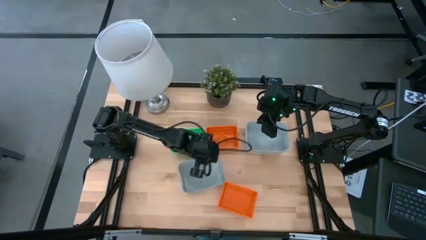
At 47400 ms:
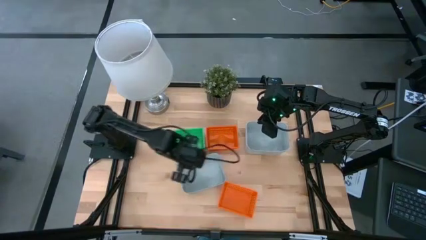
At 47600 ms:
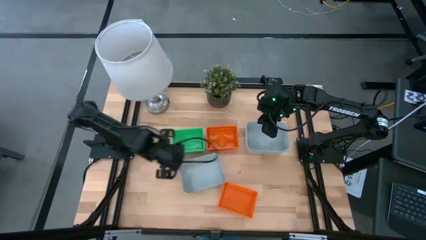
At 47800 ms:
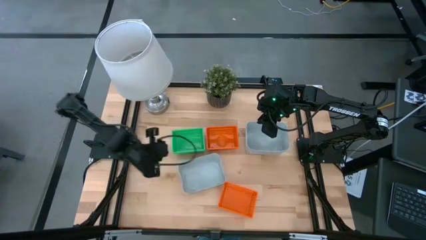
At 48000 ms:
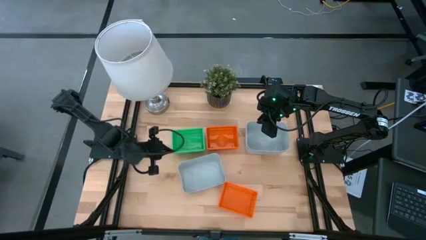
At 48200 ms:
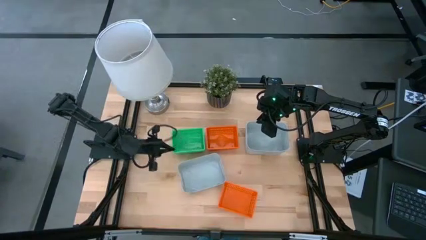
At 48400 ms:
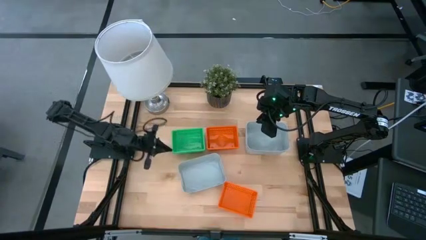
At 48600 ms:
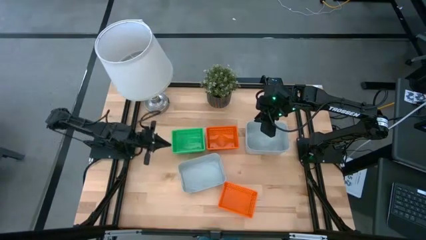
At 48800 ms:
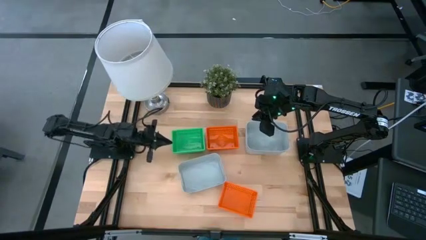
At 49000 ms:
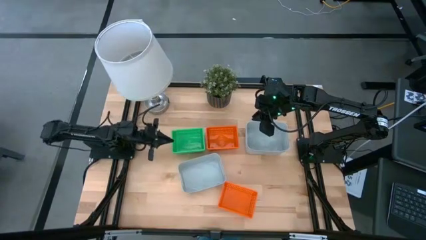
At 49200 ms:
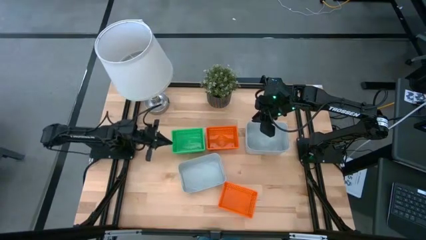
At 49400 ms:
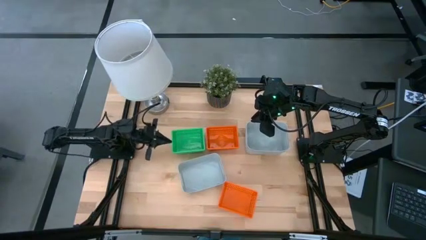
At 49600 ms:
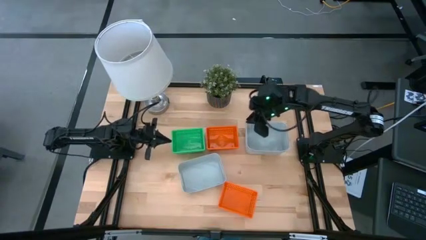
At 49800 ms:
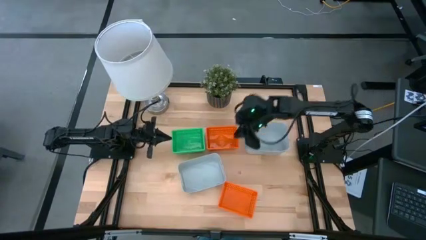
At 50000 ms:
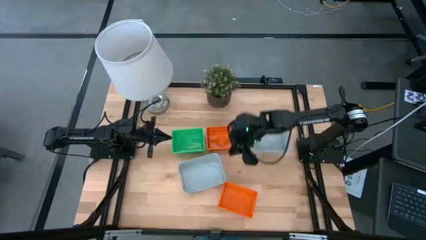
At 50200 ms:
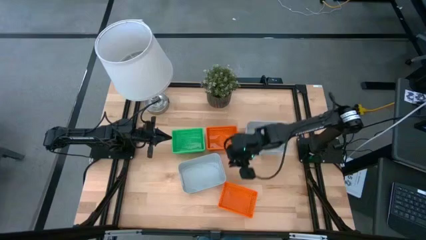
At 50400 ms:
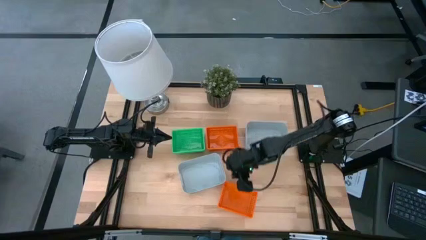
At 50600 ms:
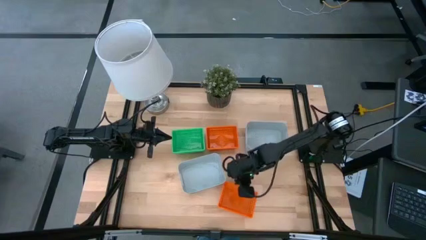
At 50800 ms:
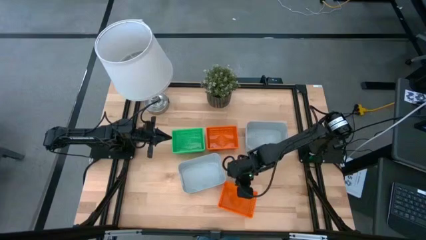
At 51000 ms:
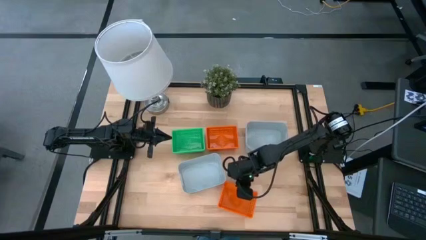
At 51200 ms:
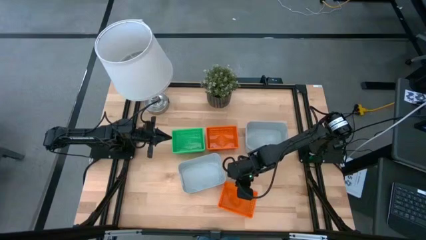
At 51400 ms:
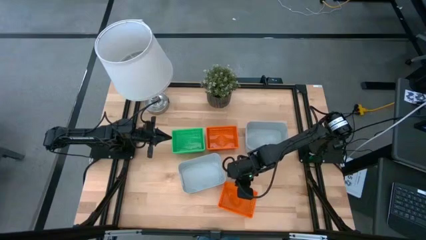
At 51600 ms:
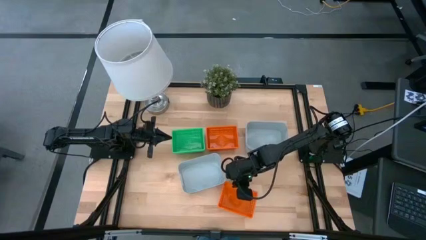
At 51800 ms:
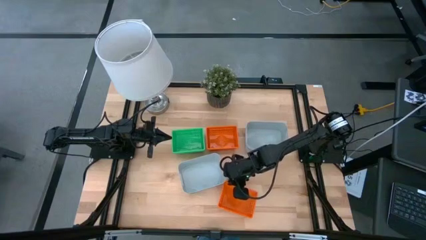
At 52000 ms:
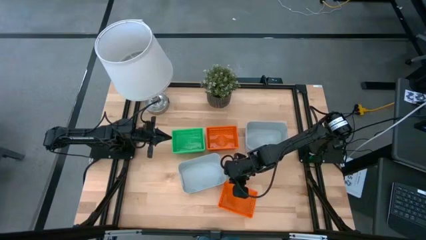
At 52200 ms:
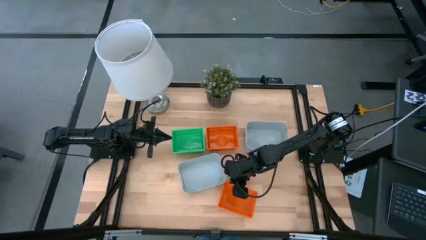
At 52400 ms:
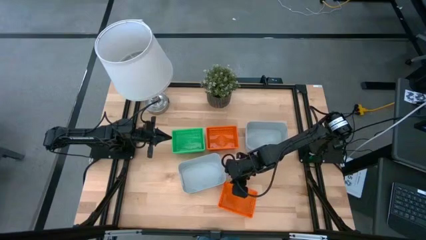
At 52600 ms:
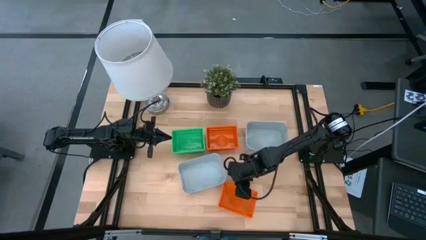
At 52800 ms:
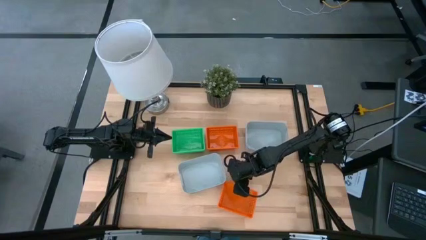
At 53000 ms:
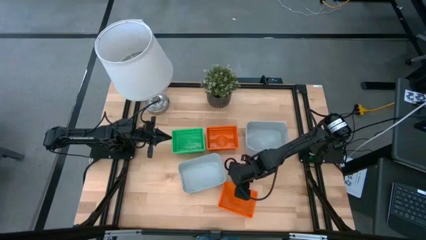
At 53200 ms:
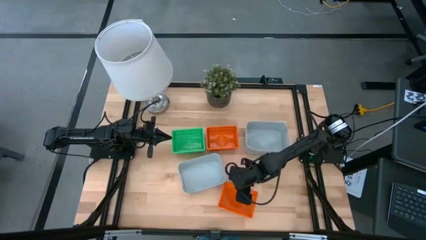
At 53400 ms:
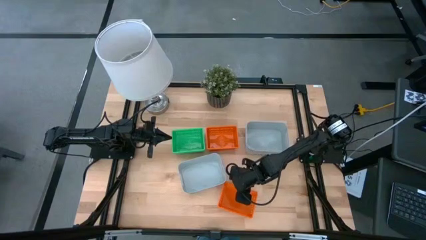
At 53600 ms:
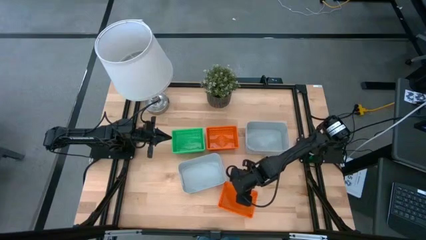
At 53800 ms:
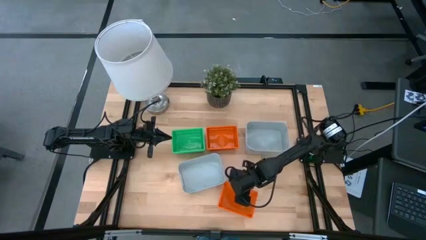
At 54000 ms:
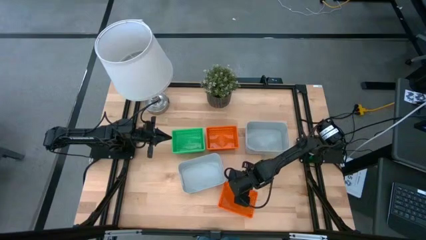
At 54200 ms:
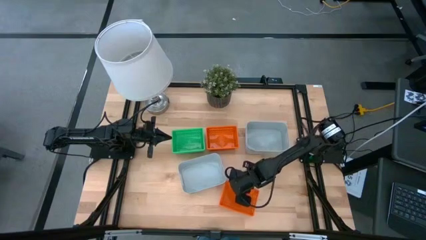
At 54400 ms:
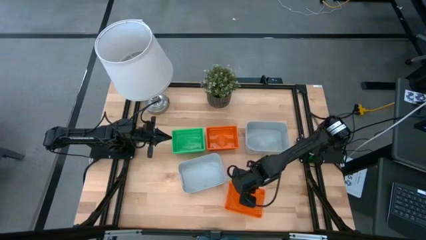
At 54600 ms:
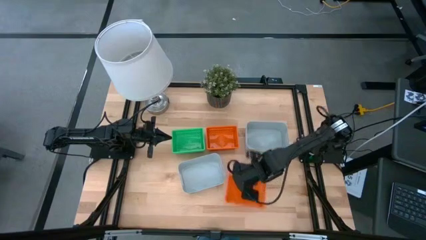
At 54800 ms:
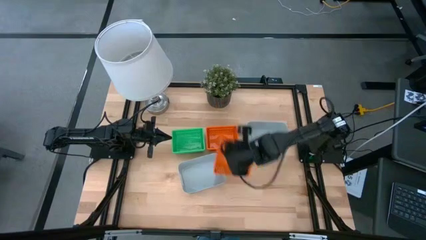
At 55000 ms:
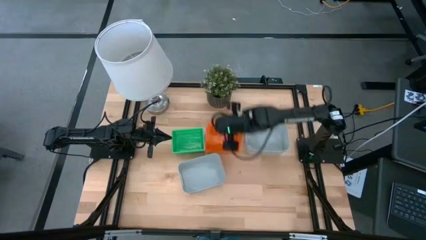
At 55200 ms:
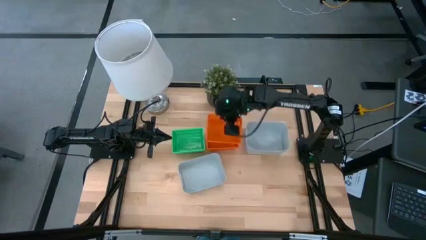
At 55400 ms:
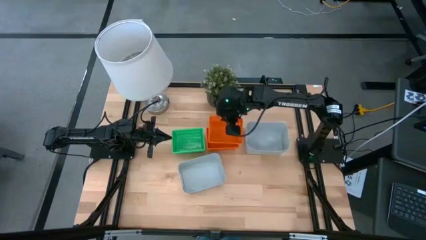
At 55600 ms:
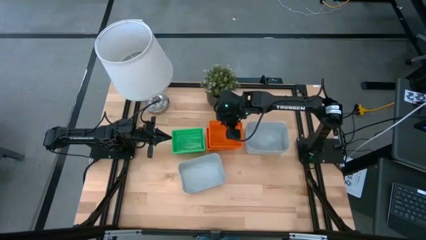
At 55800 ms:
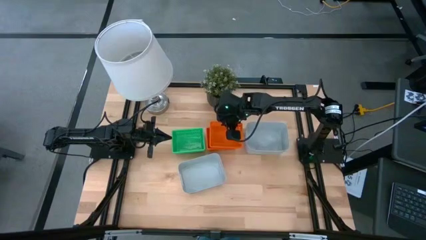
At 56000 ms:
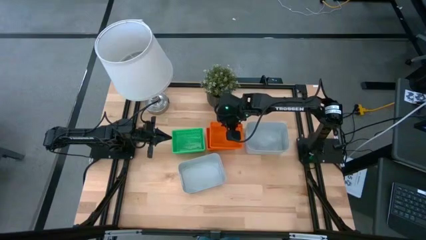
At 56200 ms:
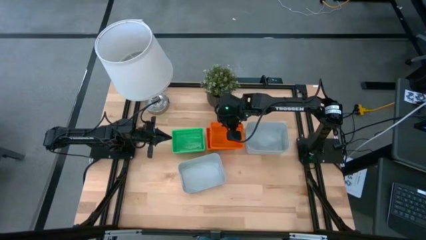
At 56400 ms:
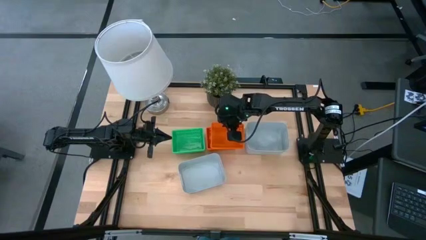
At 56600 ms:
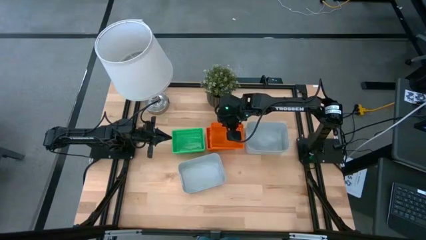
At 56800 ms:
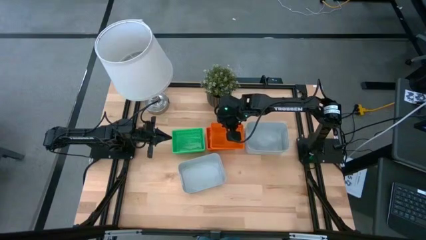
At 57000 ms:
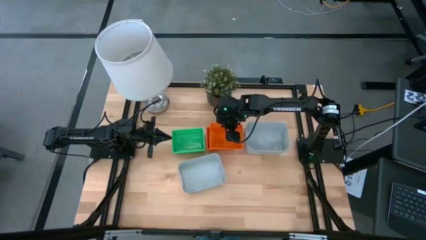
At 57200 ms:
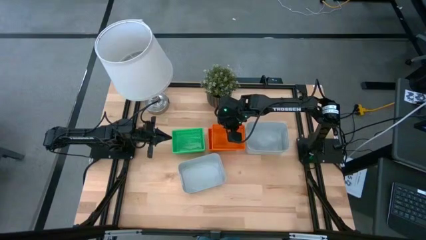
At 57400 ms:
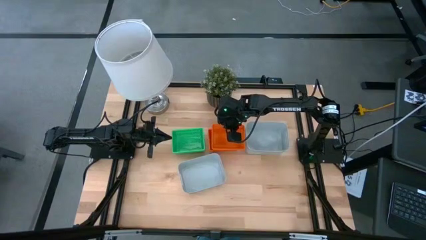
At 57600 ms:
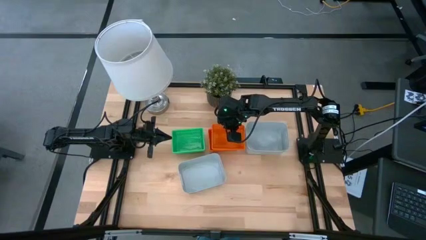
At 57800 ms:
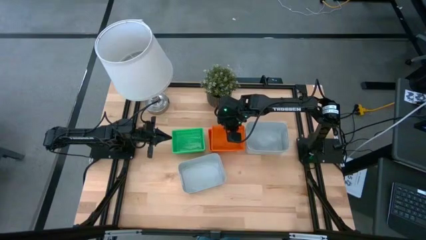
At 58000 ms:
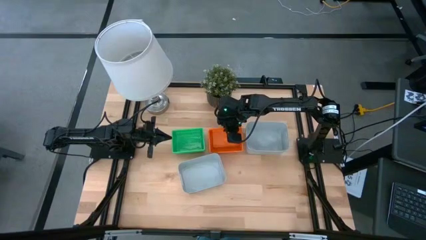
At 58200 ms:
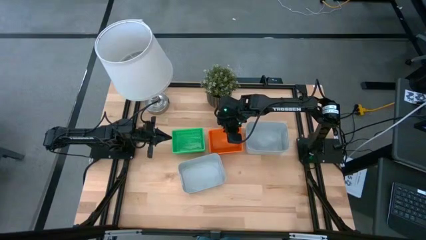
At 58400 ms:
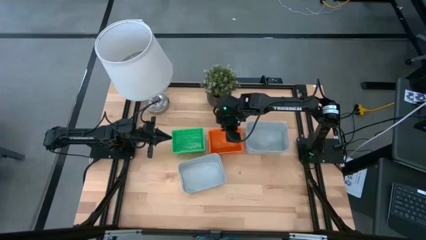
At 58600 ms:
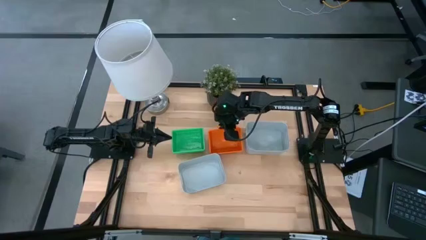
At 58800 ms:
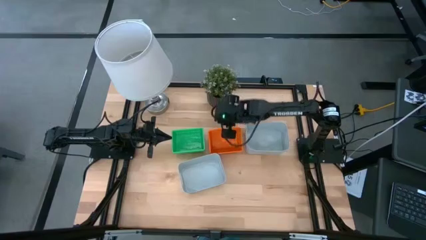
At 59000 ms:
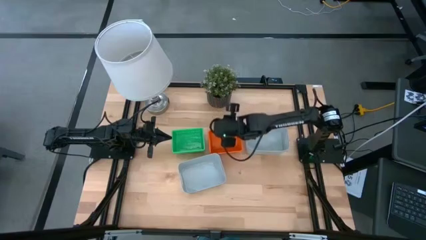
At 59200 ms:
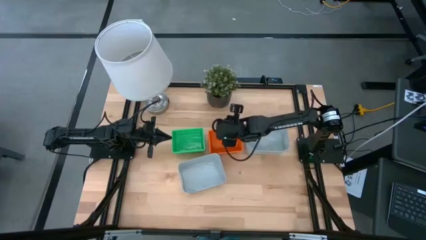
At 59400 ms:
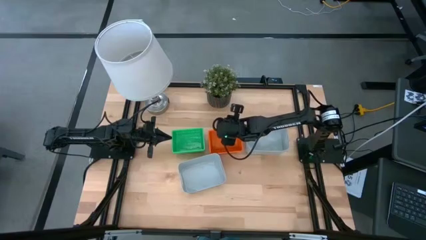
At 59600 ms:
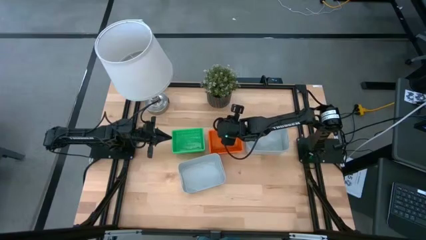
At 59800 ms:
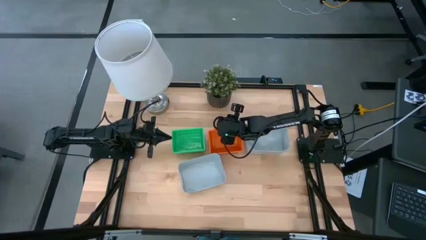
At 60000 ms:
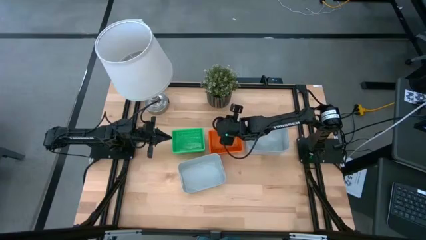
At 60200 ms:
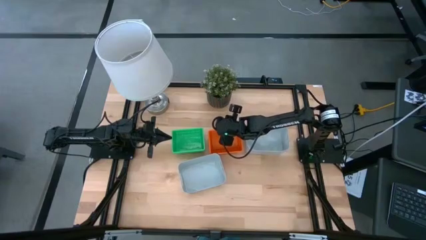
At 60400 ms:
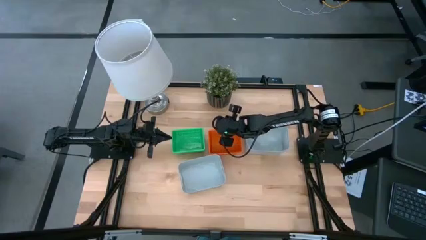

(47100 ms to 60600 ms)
Stack the bottom orange bin on the top of the orange bins
